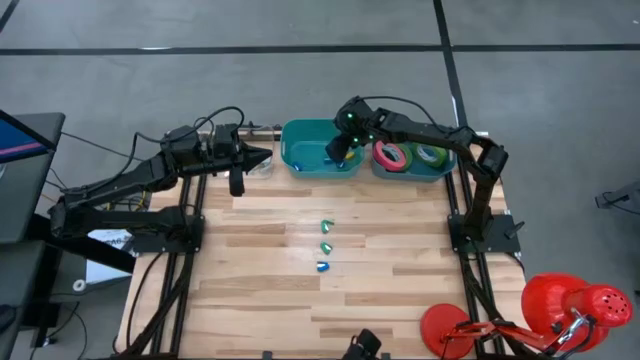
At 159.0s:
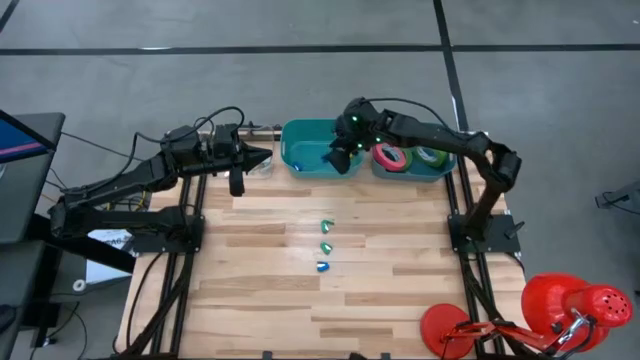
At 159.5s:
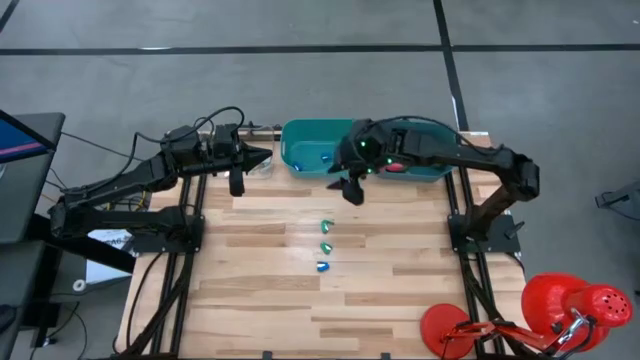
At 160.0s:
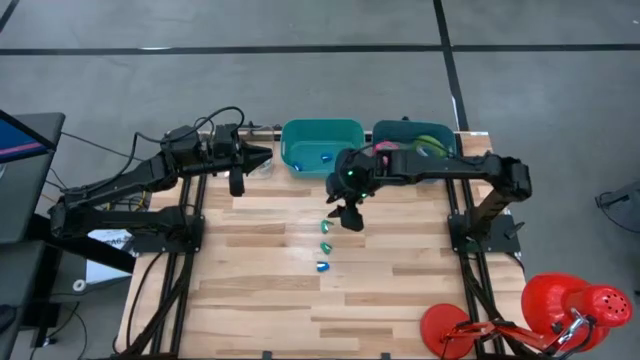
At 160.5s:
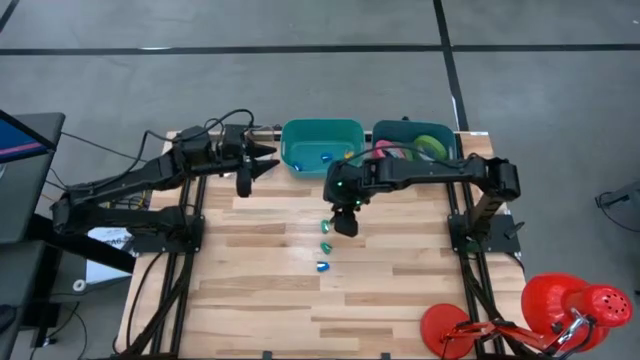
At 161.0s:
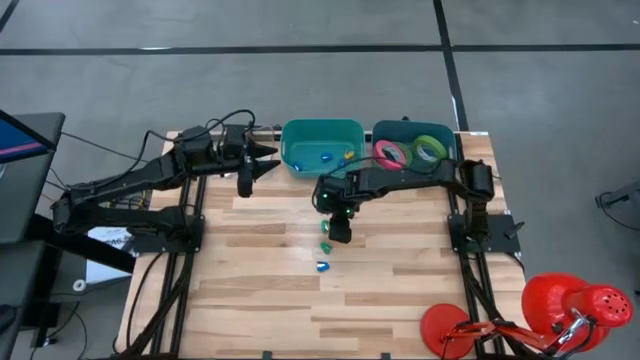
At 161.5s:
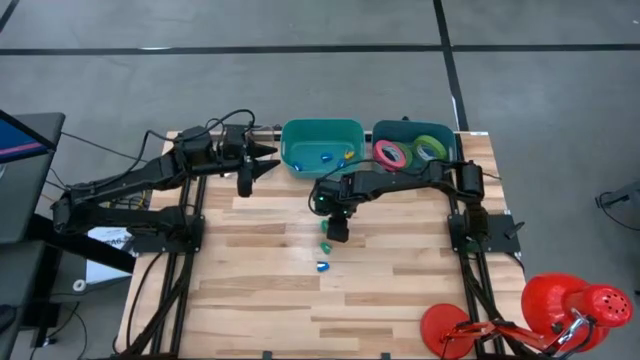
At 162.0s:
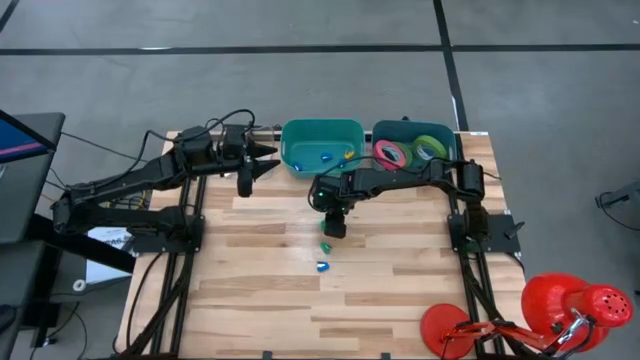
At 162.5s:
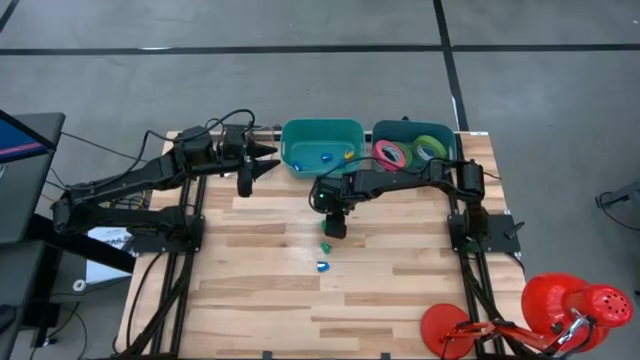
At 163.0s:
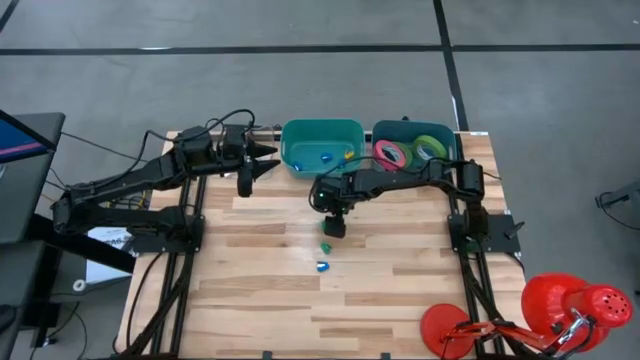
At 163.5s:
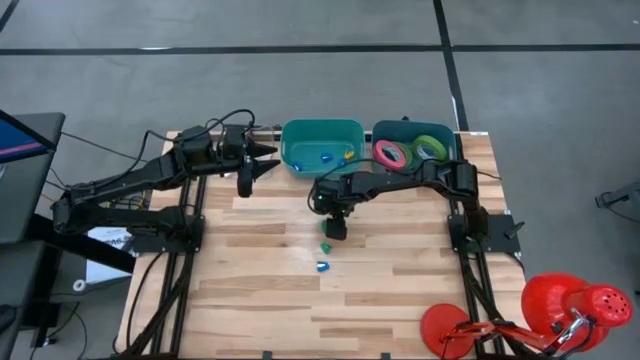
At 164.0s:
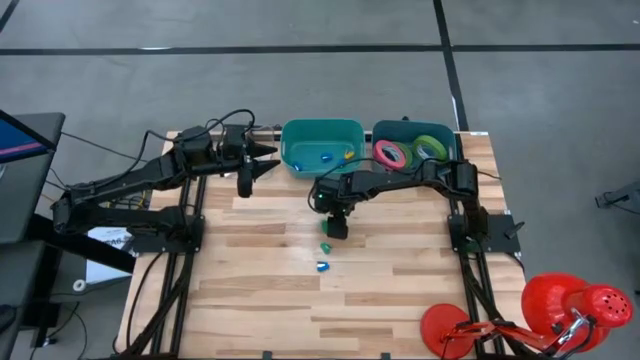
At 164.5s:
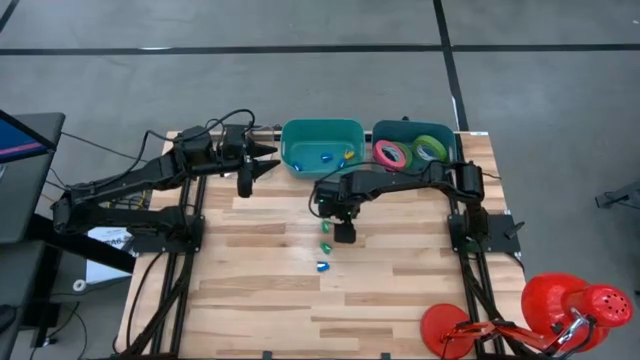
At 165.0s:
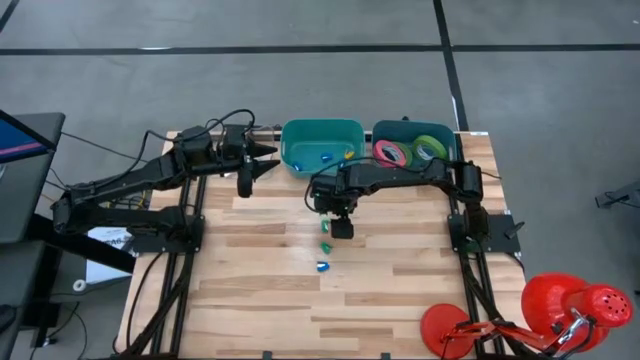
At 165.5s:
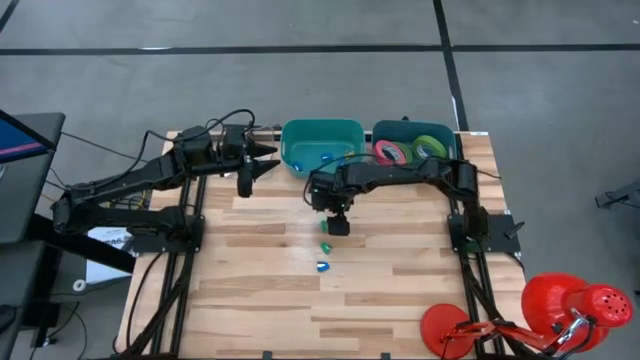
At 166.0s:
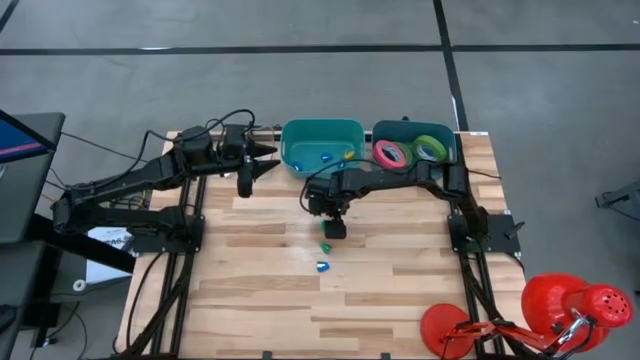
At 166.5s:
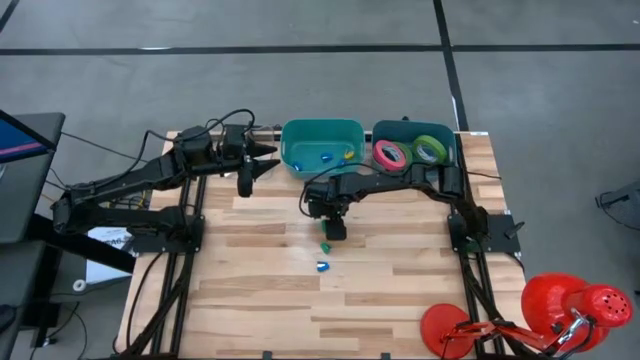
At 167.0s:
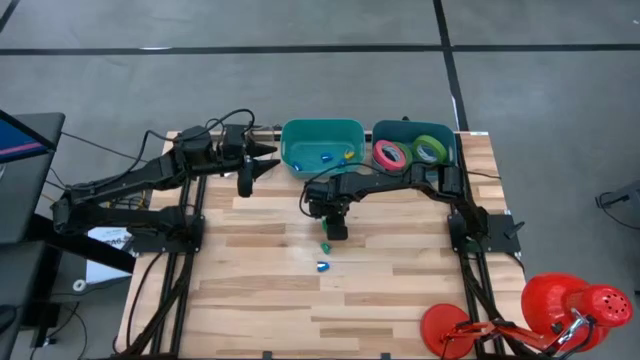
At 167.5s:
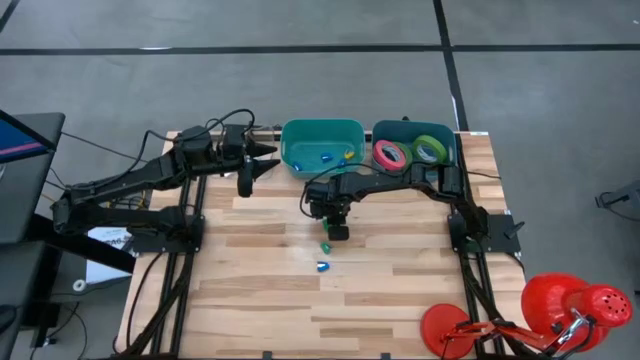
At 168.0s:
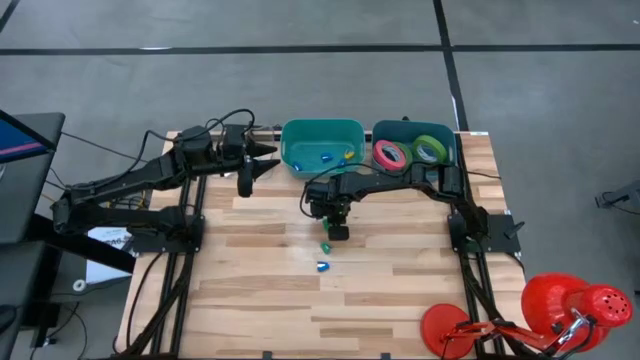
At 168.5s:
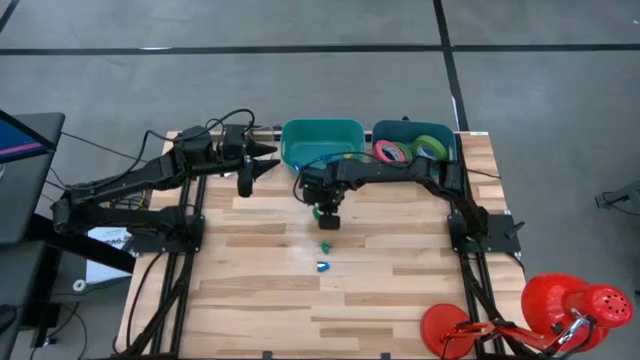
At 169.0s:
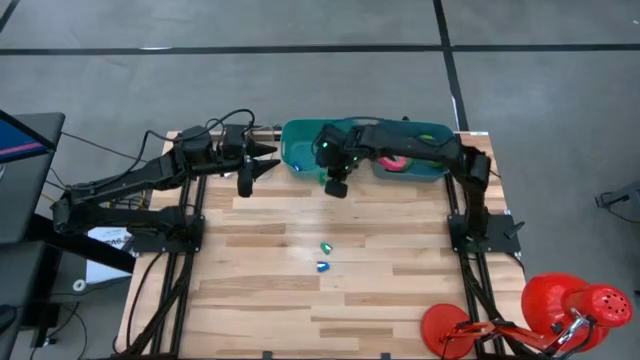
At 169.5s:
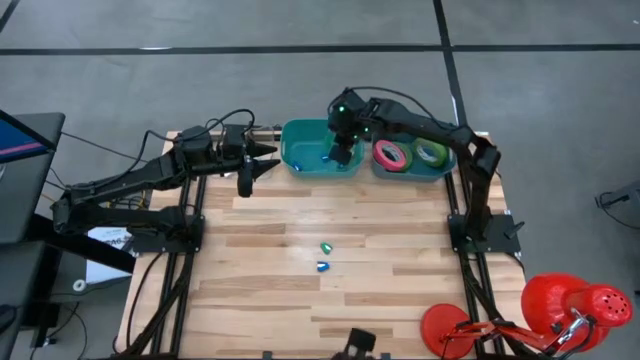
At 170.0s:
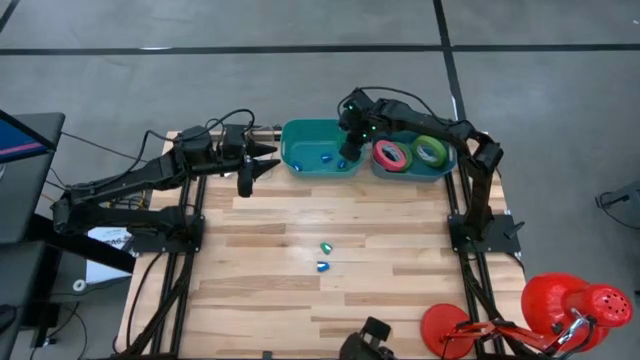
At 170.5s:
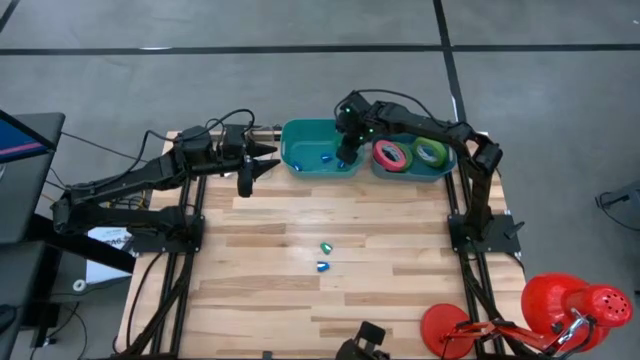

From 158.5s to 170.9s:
Task: Pick and place Stapler, Stapler remover, tape
Put the green stapler into the green bin

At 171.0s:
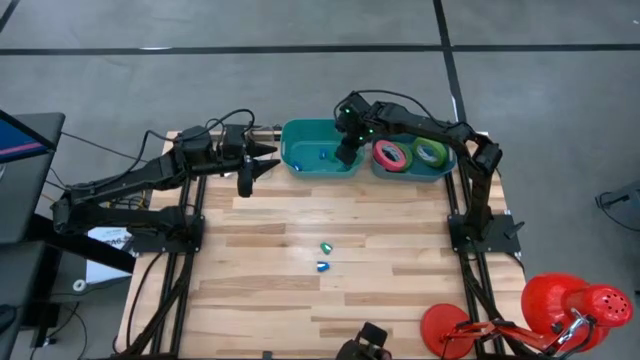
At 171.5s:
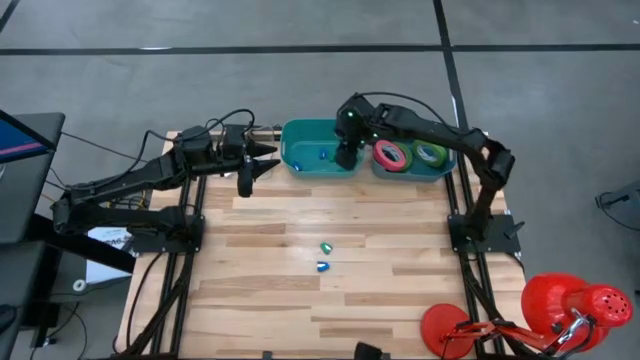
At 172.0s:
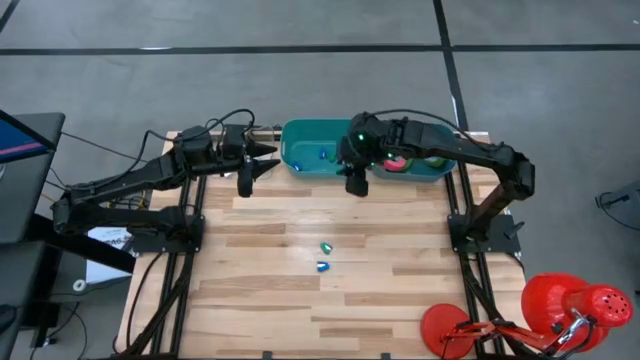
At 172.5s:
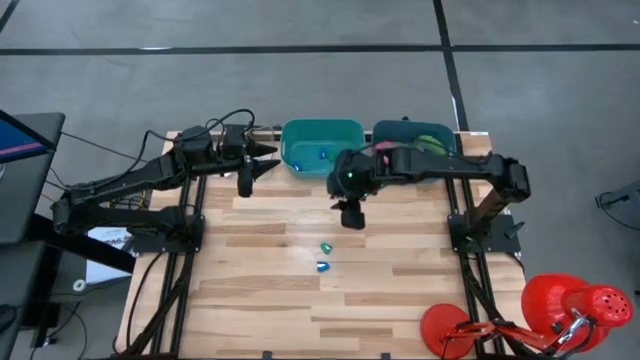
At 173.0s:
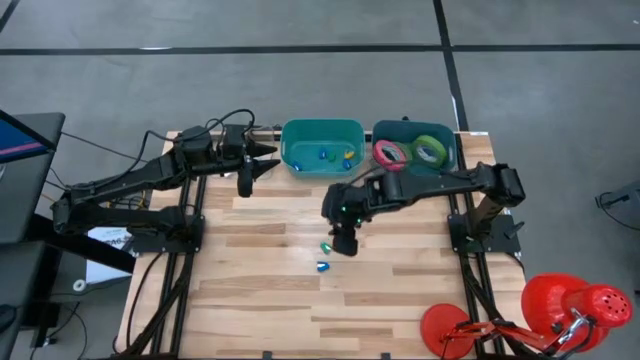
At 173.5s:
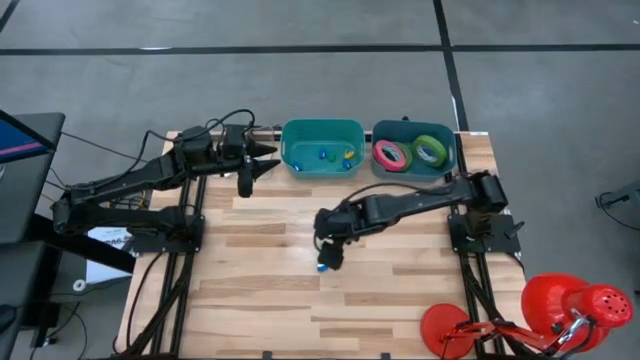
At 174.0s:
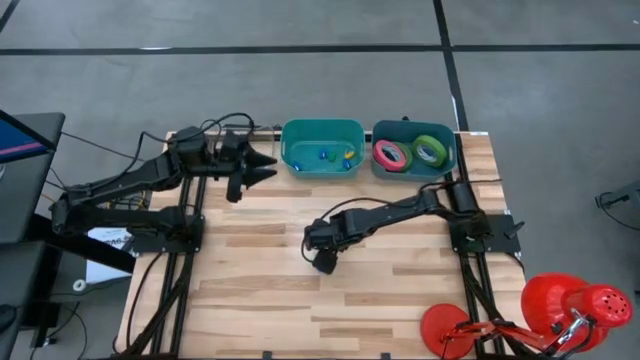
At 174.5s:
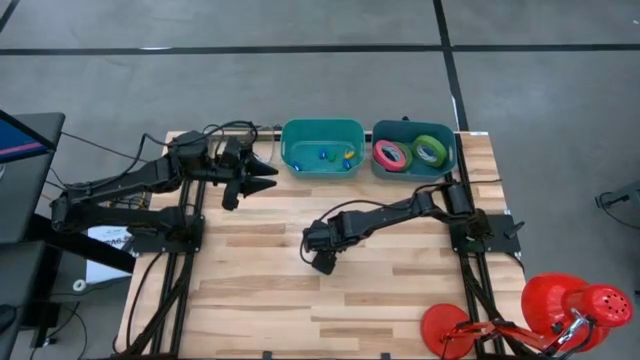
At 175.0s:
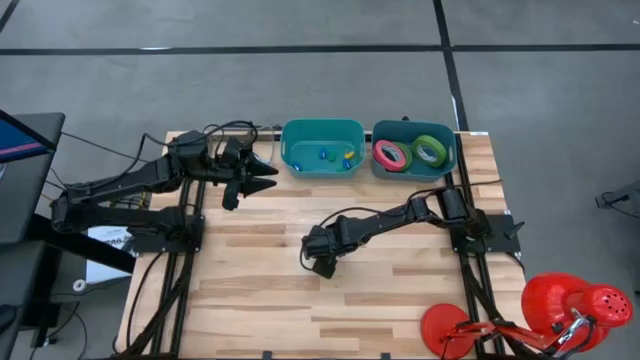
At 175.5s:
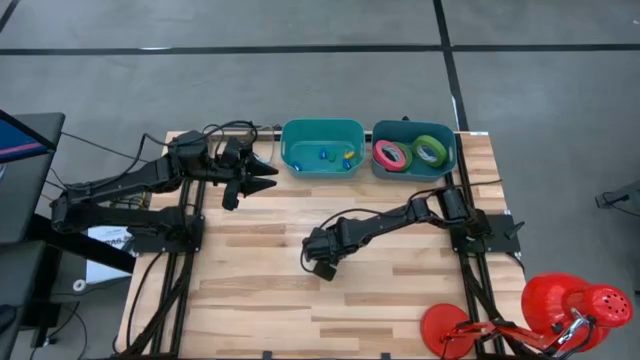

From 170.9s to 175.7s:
Put the green stapler into the green bin
